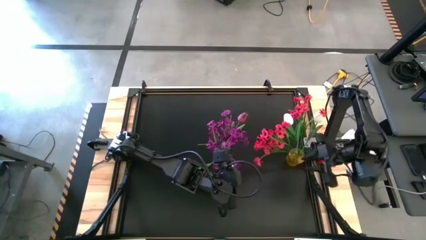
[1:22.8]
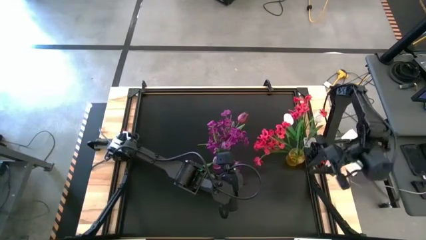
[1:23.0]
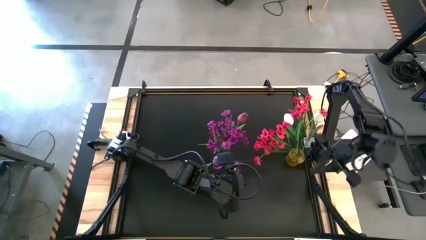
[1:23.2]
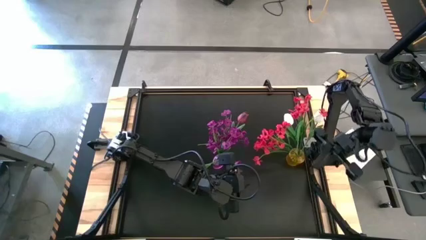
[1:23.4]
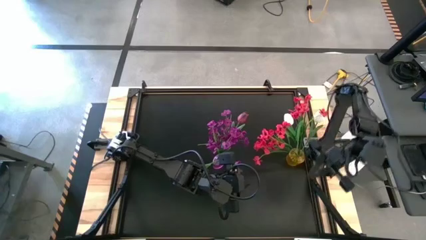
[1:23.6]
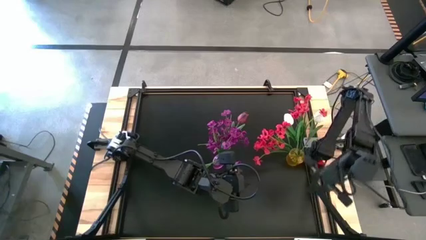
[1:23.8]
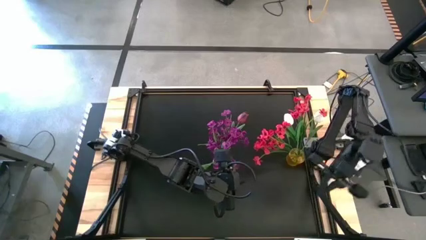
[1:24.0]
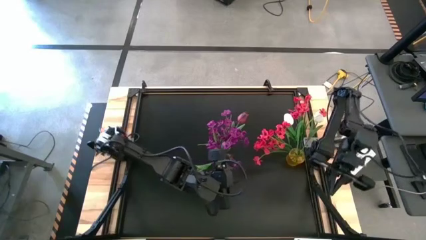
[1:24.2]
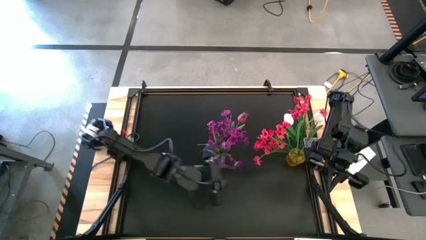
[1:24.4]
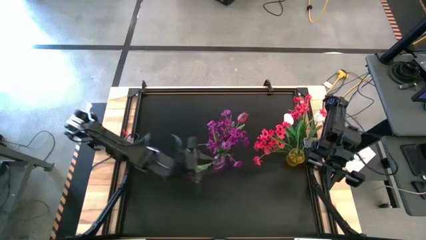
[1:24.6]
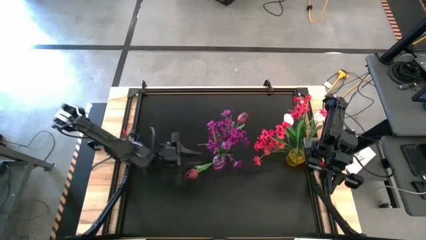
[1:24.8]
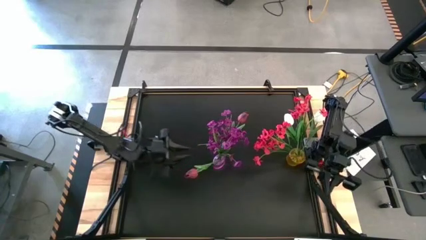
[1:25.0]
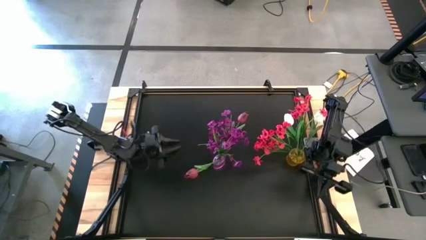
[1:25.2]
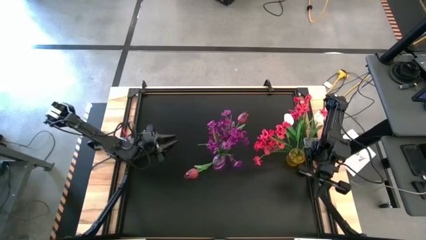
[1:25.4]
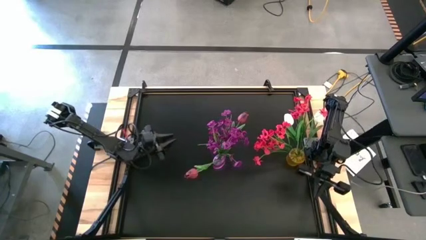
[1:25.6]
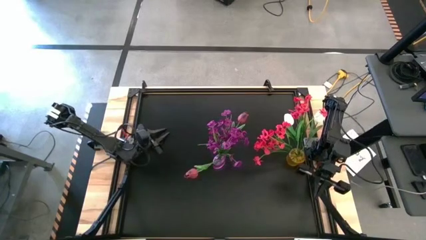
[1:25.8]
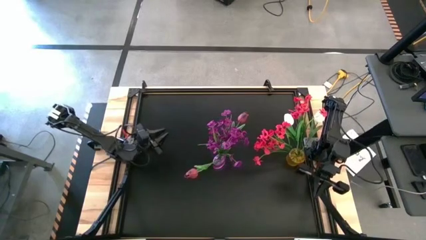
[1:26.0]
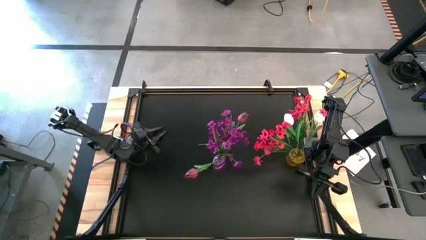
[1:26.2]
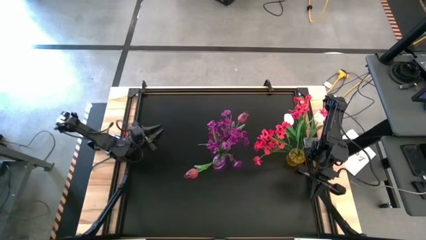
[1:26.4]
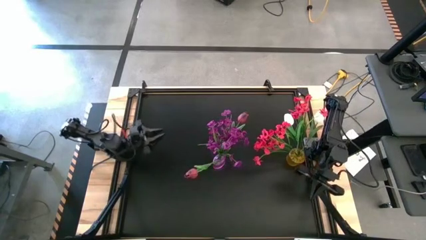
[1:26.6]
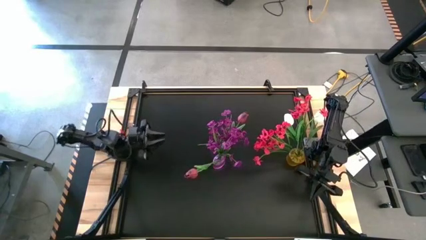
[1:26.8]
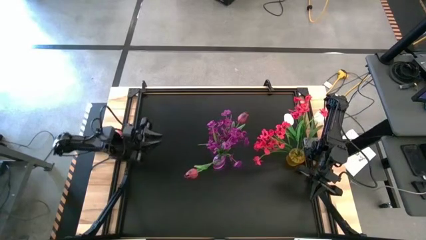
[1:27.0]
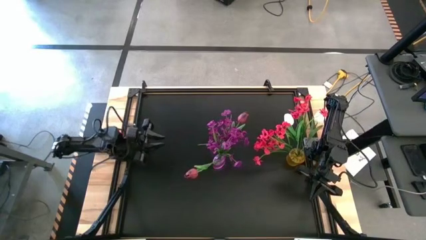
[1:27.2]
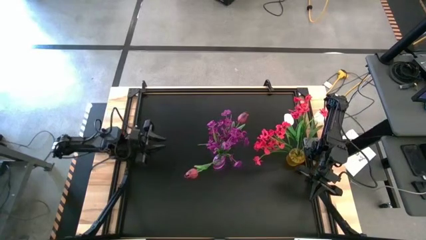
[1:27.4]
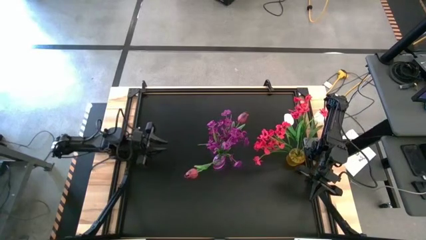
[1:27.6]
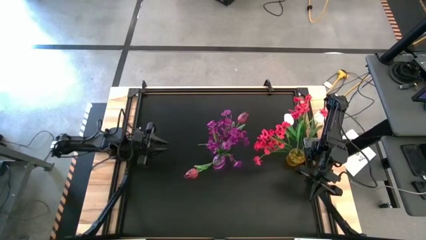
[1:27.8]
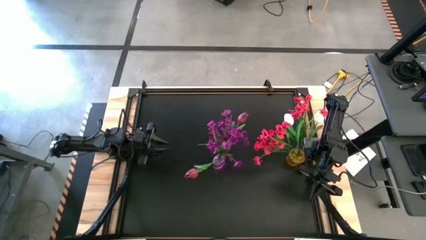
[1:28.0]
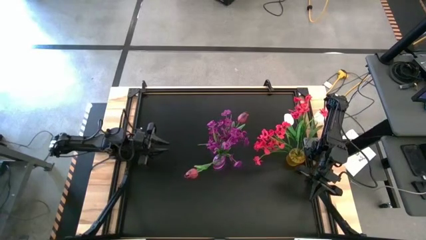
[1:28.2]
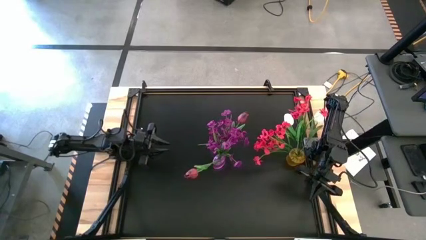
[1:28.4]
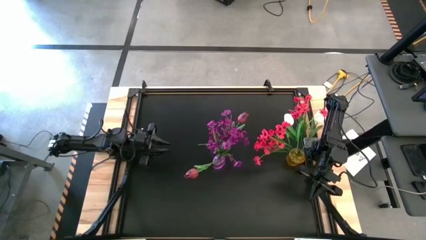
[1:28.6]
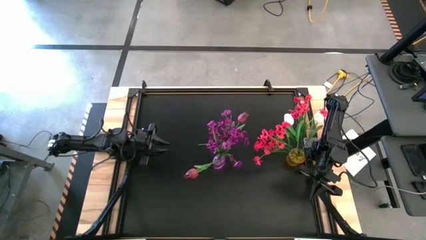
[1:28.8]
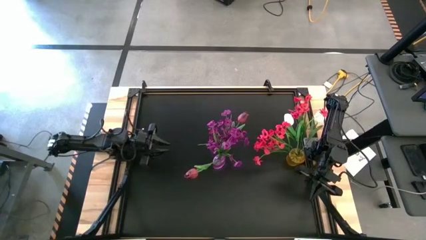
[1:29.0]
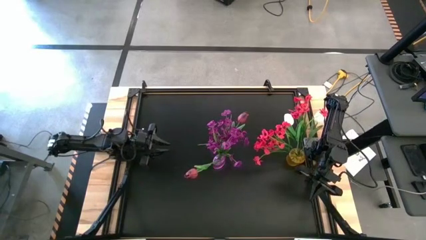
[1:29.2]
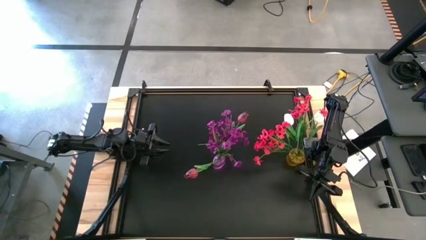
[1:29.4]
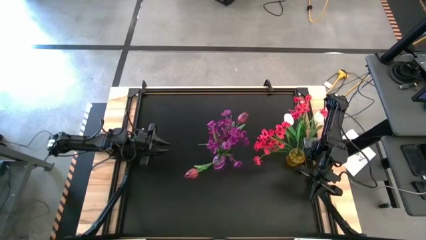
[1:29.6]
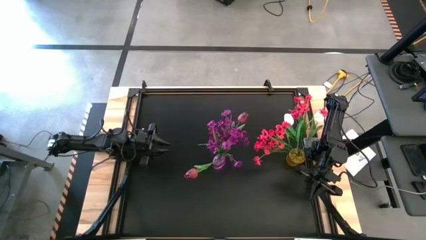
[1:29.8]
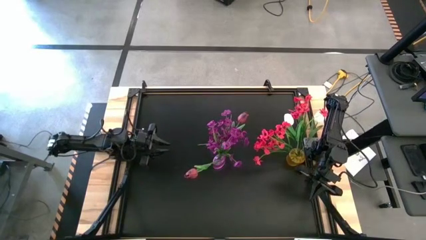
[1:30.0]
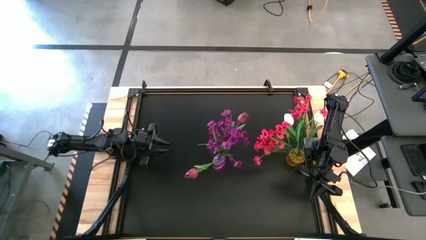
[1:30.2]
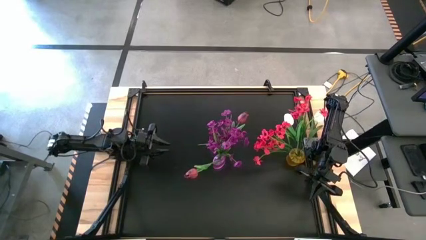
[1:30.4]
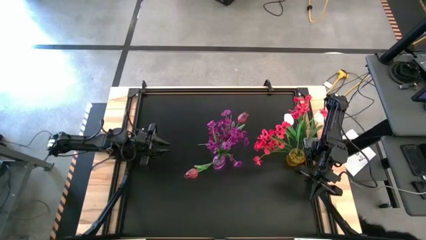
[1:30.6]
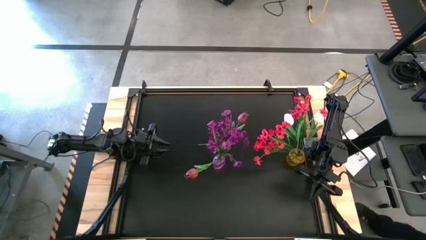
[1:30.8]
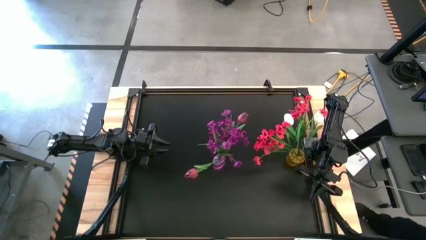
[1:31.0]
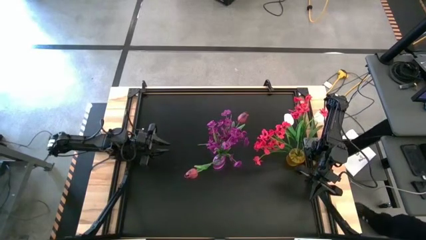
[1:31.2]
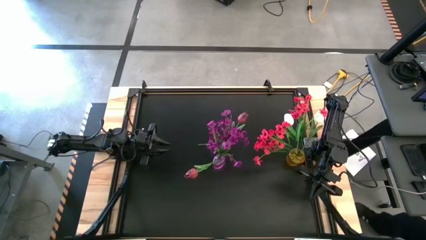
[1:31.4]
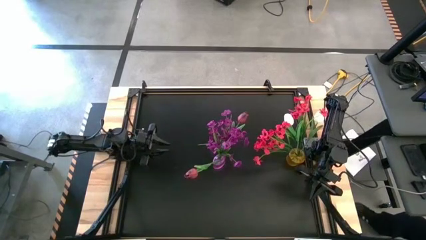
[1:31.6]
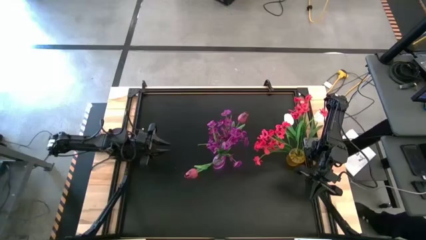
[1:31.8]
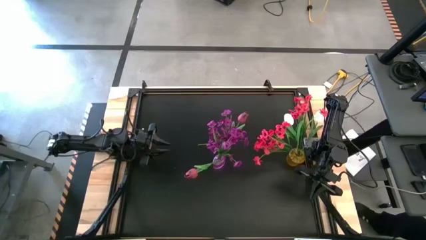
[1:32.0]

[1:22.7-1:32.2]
Task: Sort flowers into vase by color
Return to Home Position

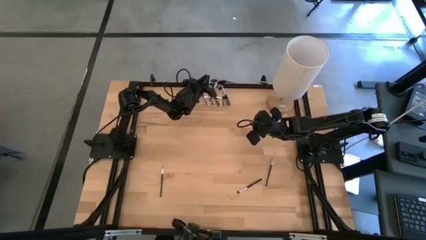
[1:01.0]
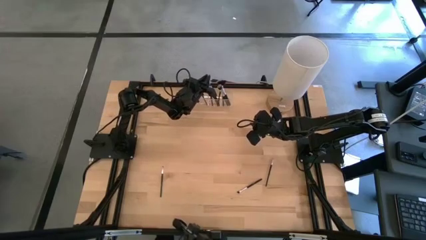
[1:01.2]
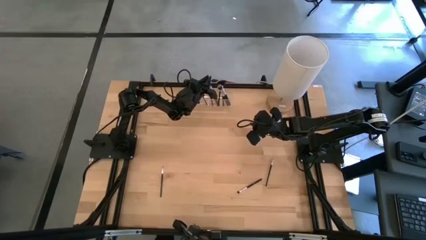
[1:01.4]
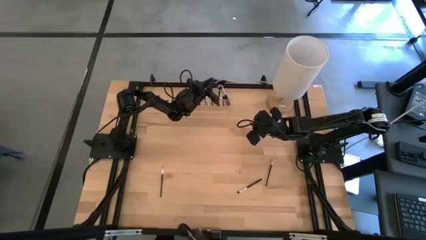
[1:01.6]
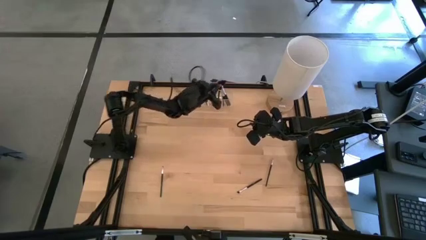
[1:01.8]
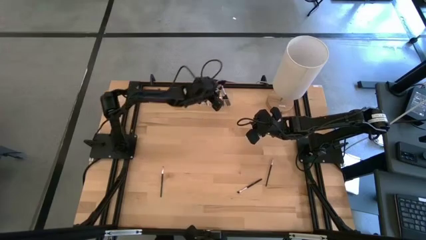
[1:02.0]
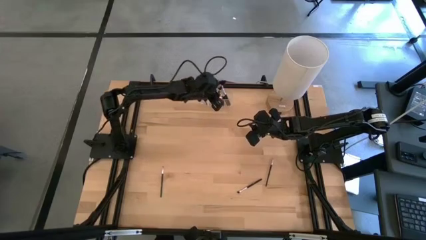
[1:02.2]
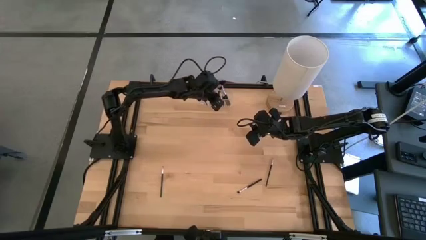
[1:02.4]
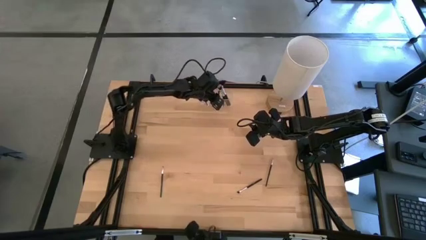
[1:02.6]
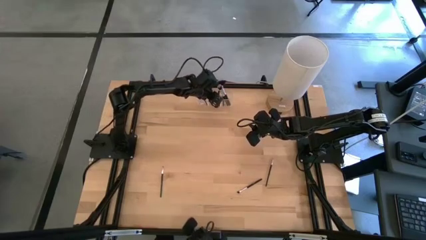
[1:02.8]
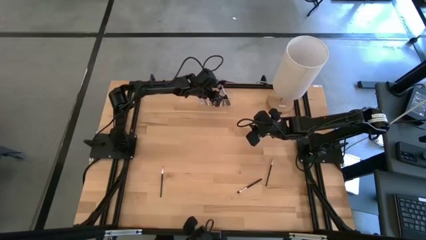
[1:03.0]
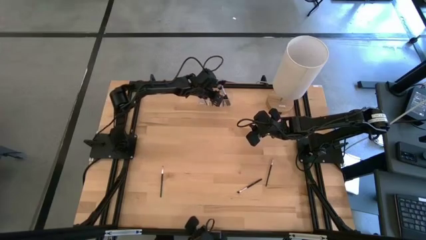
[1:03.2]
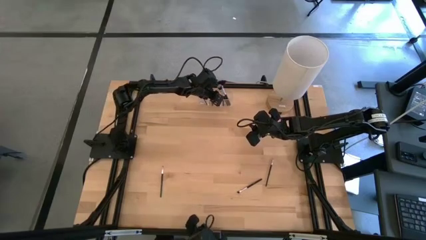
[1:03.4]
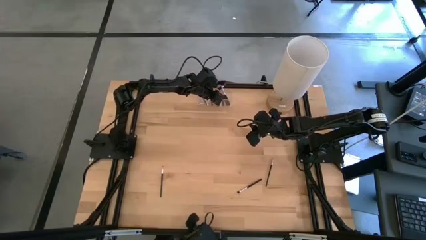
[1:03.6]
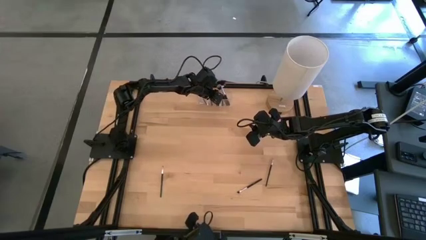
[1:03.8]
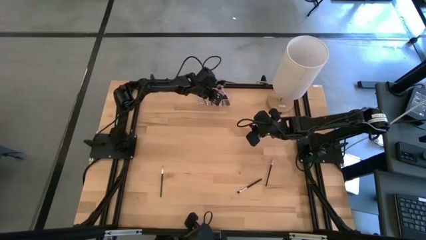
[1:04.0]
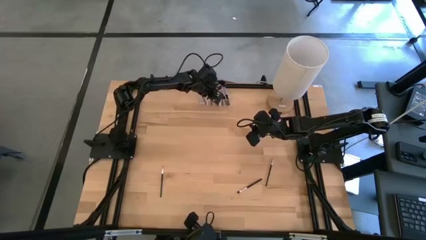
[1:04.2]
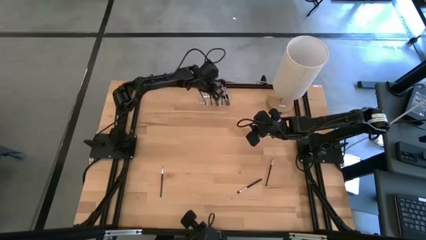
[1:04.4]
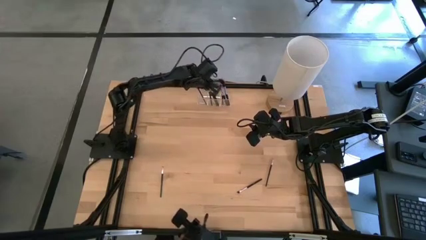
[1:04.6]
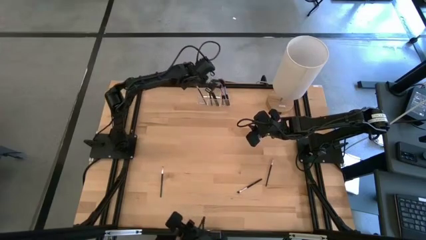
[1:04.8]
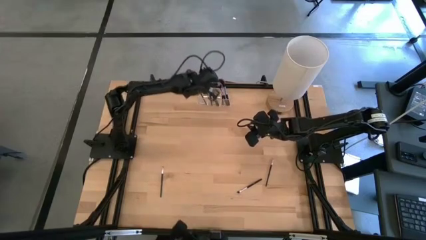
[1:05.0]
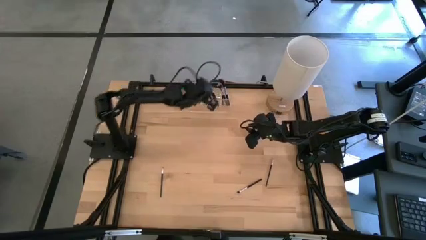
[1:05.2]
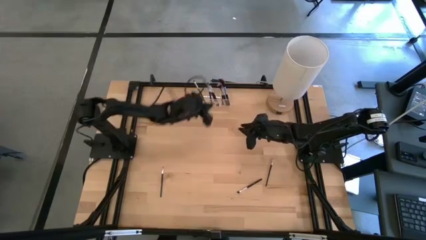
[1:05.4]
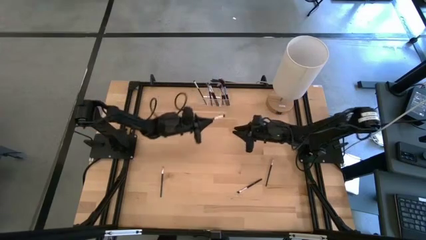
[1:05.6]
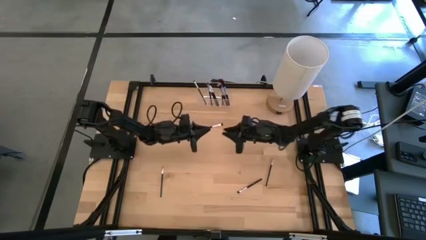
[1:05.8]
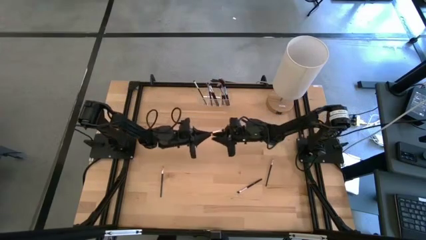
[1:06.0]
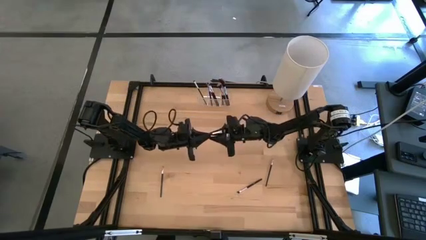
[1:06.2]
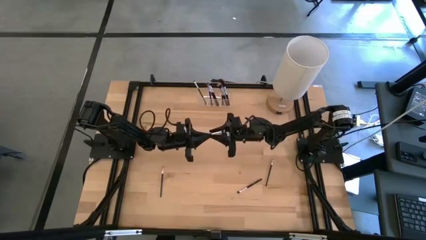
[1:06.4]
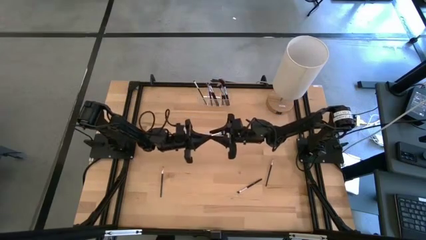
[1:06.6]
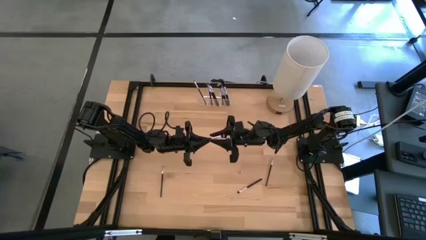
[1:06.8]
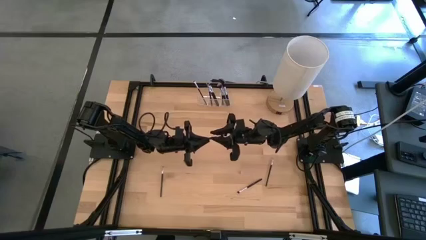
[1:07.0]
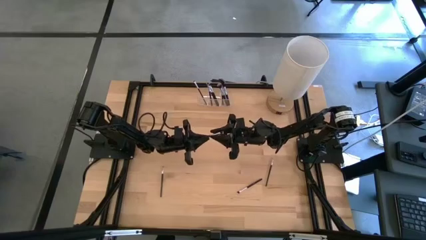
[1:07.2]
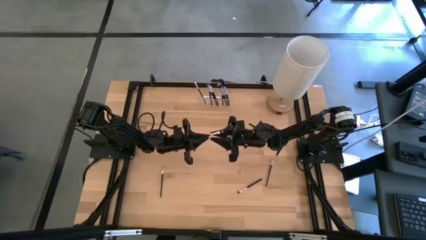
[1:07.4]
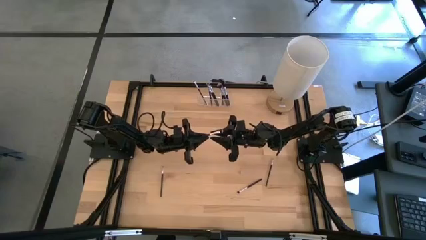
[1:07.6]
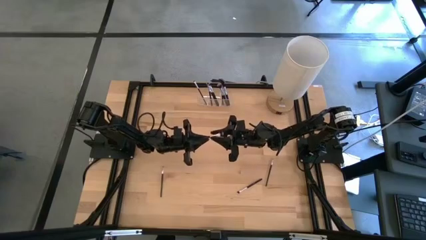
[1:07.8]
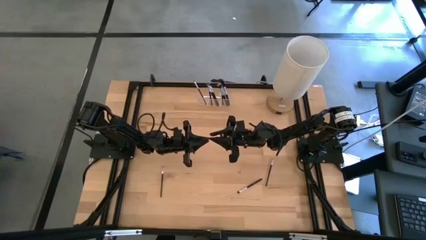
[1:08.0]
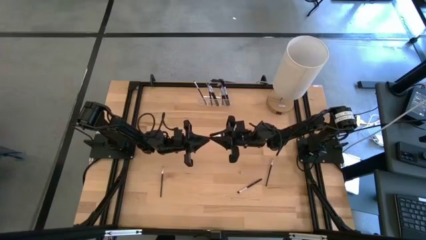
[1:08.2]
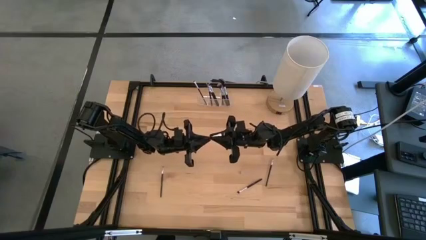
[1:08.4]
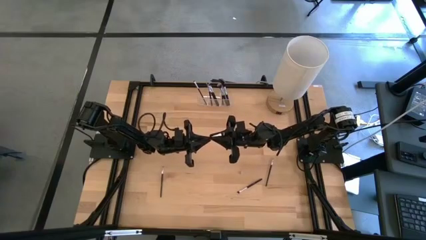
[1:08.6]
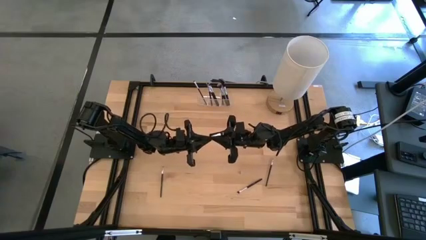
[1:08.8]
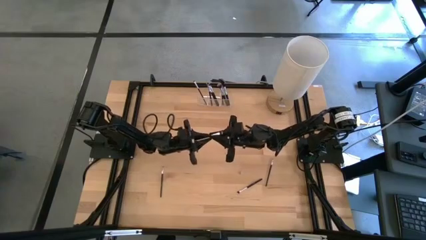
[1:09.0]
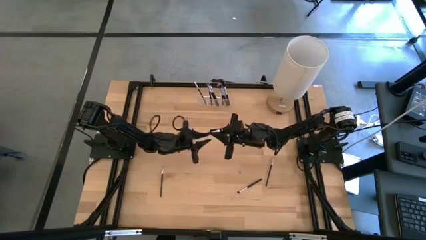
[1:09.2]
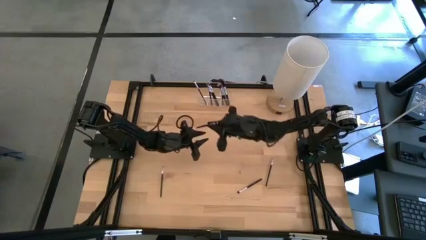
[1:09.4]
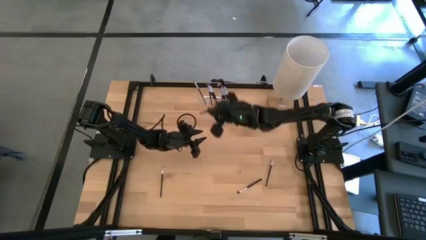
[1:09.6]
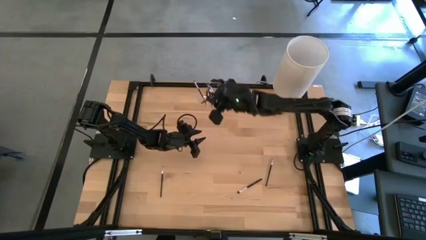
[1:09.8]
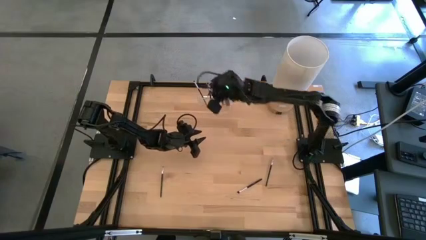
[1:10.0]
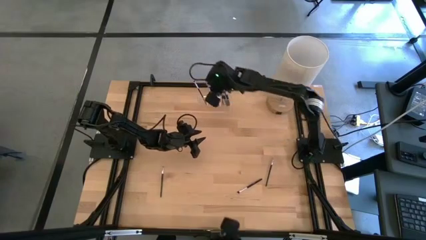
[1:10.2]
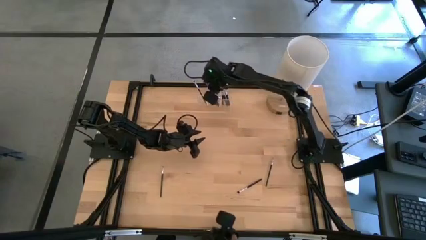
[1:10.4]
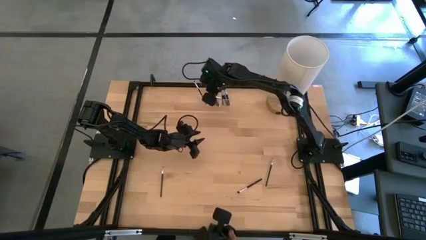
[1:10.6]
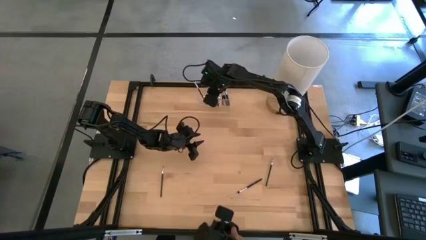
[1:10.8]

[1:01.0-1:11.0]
Task: Put items in baskets/containers
Put the black eyeshadow brush into the transparent organizer
